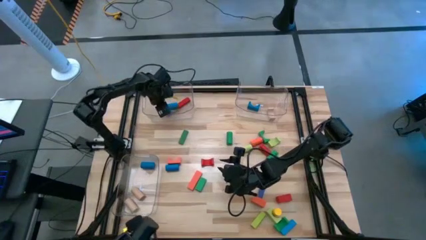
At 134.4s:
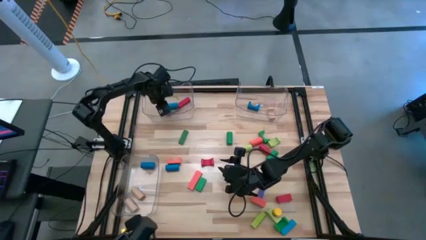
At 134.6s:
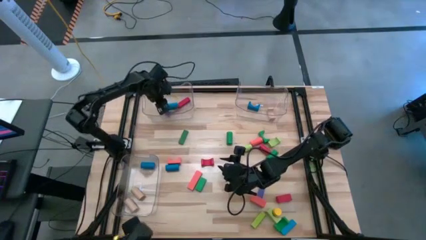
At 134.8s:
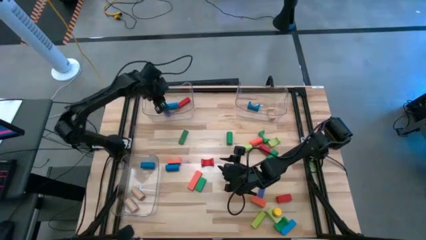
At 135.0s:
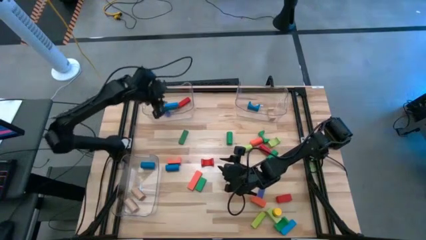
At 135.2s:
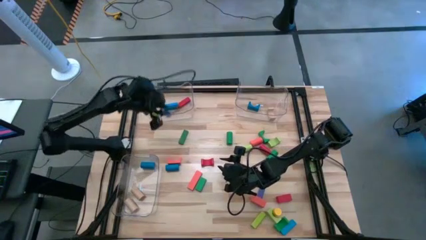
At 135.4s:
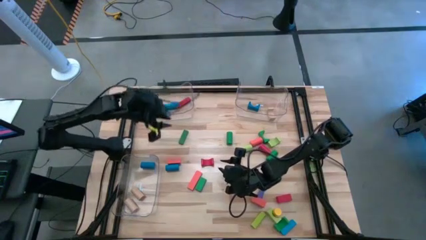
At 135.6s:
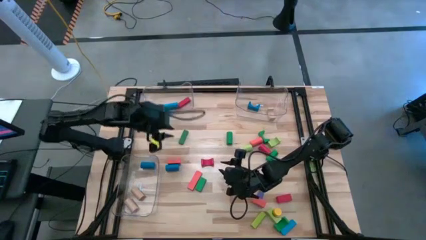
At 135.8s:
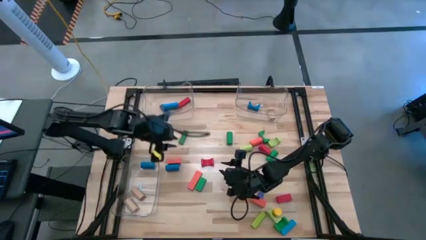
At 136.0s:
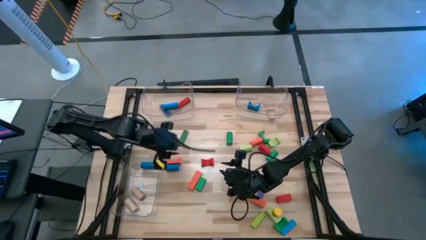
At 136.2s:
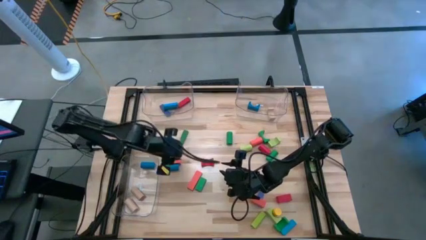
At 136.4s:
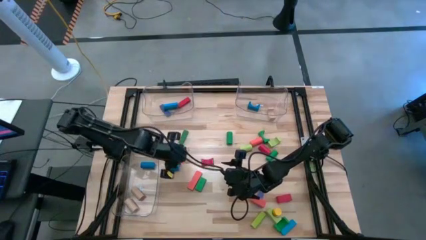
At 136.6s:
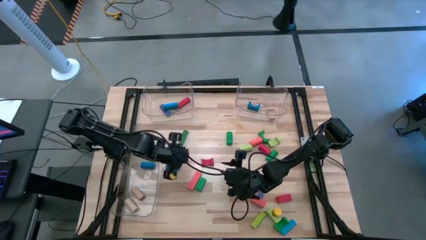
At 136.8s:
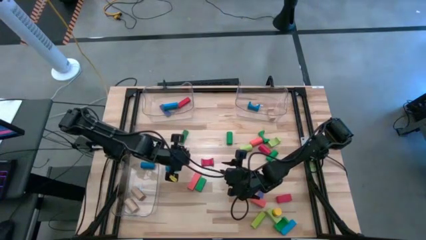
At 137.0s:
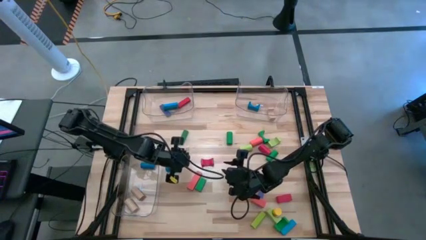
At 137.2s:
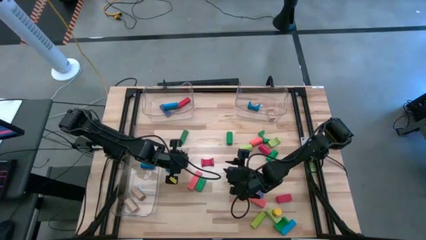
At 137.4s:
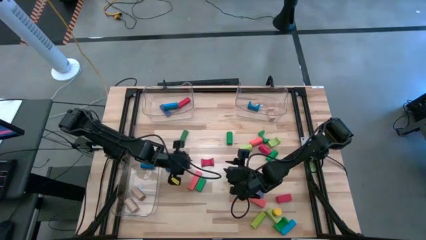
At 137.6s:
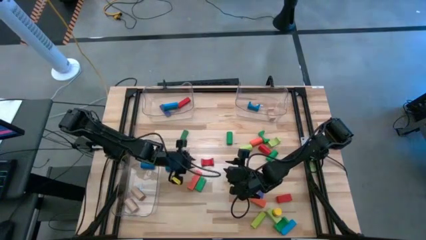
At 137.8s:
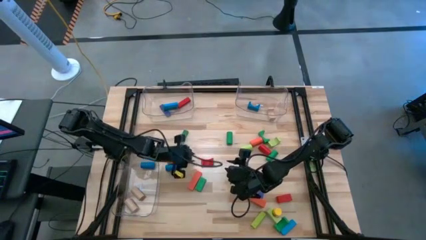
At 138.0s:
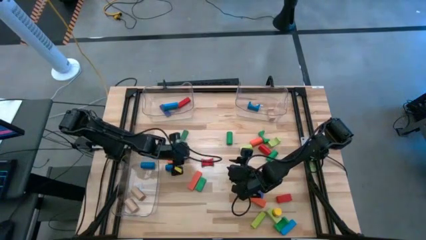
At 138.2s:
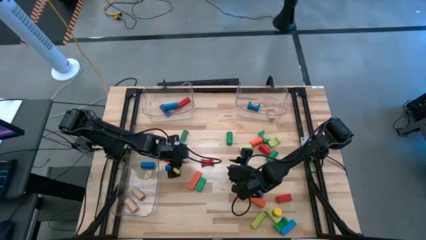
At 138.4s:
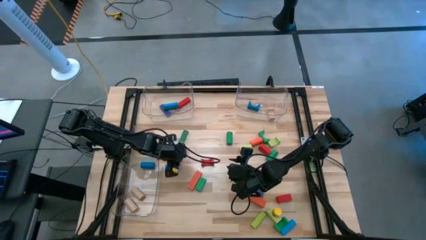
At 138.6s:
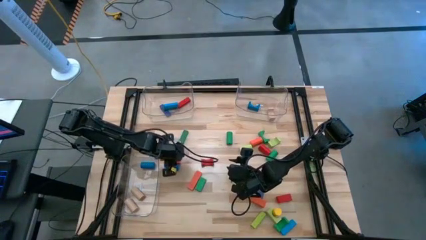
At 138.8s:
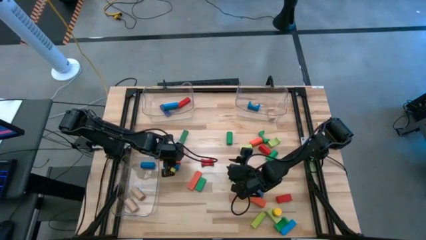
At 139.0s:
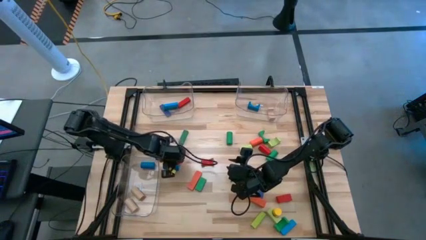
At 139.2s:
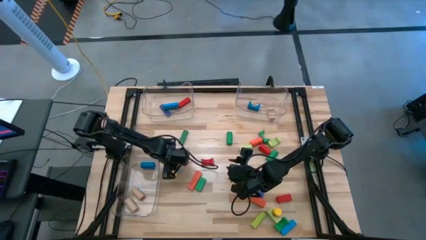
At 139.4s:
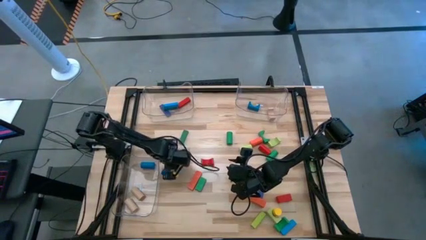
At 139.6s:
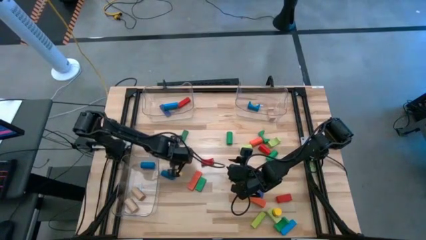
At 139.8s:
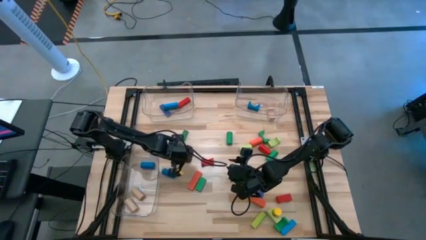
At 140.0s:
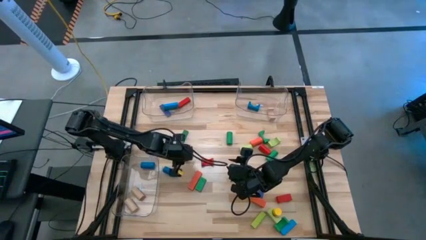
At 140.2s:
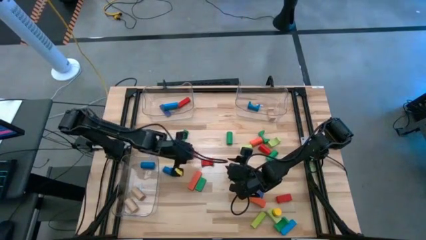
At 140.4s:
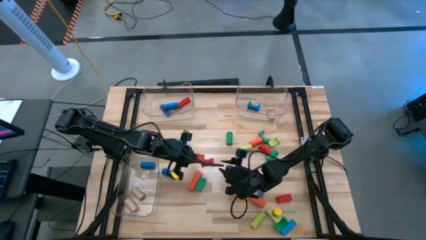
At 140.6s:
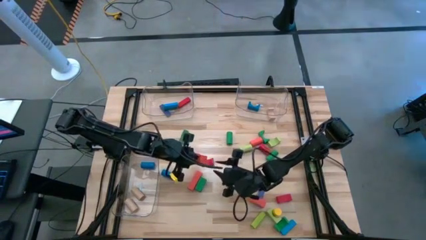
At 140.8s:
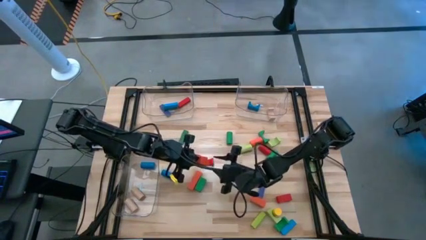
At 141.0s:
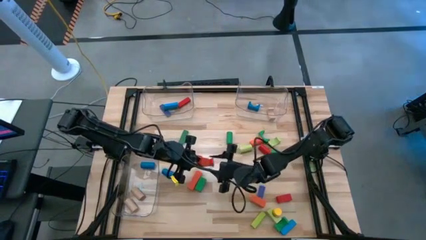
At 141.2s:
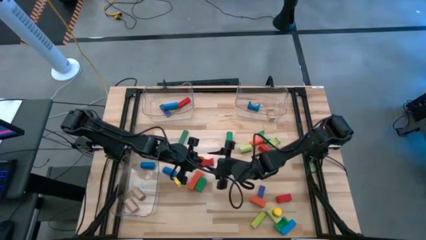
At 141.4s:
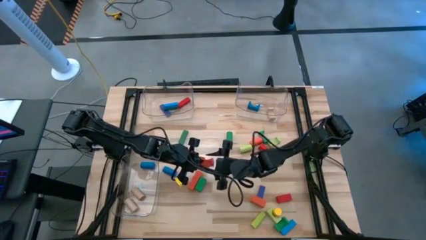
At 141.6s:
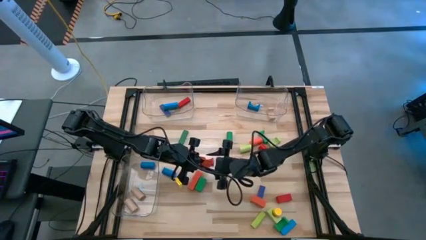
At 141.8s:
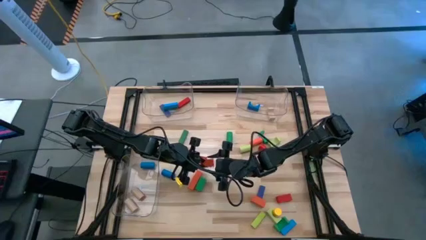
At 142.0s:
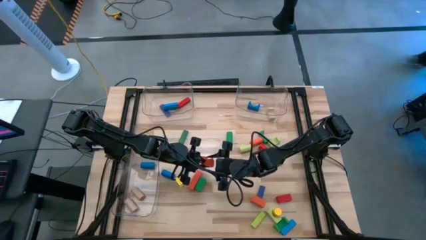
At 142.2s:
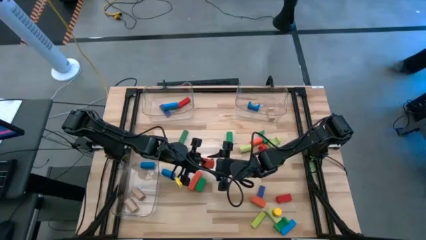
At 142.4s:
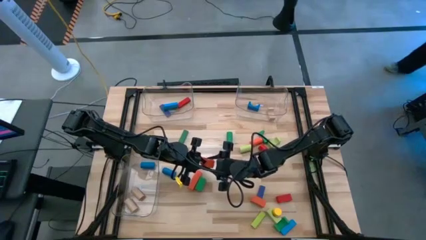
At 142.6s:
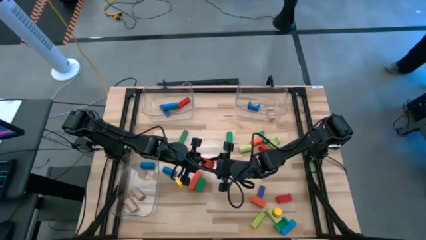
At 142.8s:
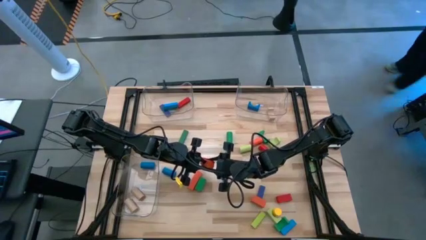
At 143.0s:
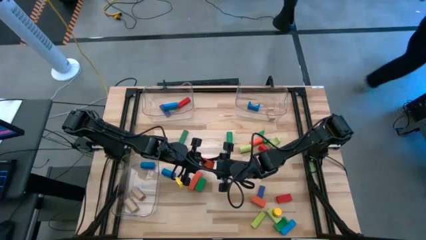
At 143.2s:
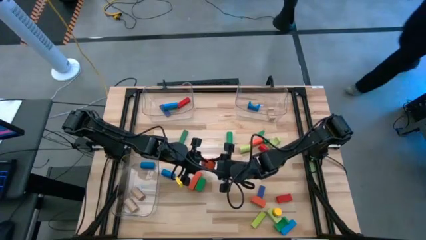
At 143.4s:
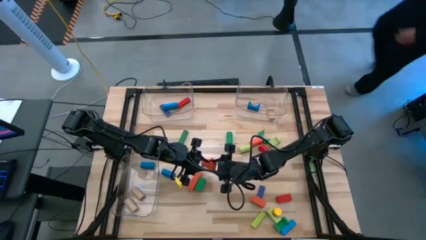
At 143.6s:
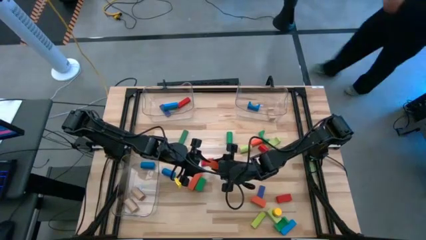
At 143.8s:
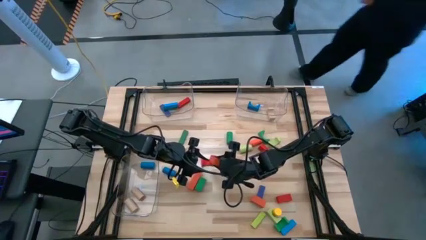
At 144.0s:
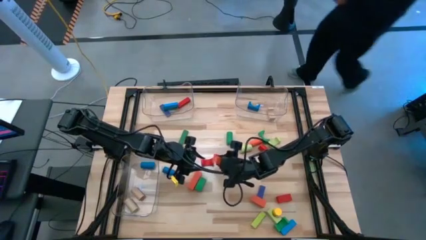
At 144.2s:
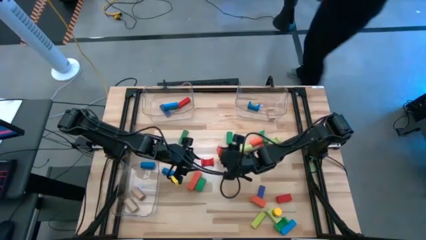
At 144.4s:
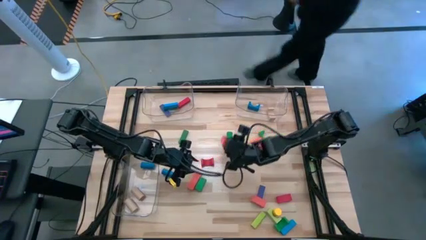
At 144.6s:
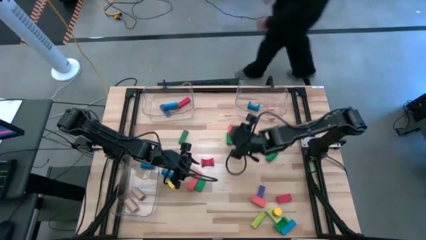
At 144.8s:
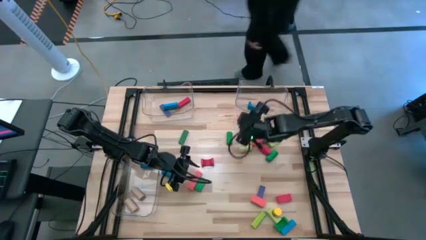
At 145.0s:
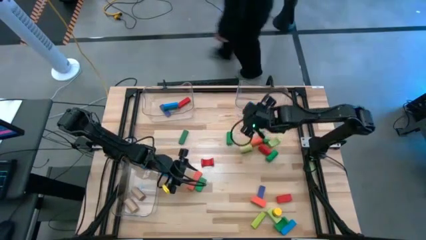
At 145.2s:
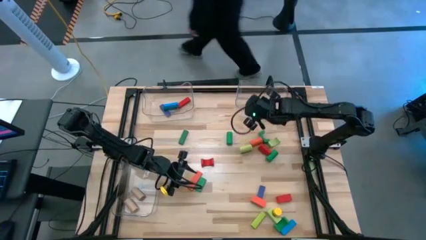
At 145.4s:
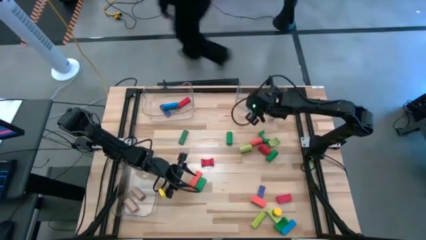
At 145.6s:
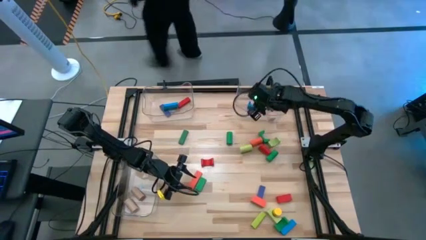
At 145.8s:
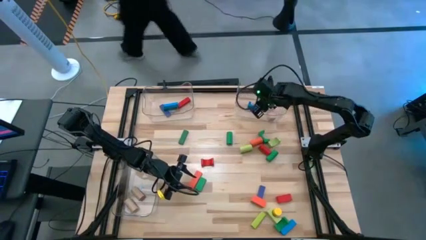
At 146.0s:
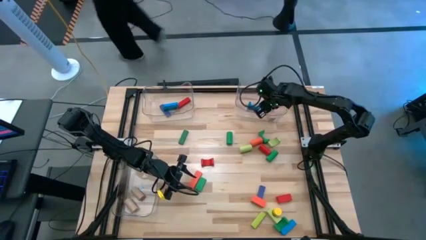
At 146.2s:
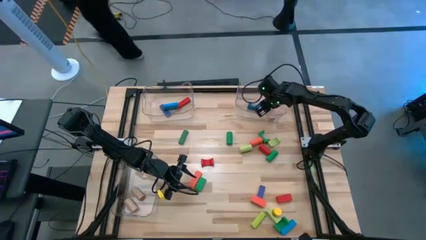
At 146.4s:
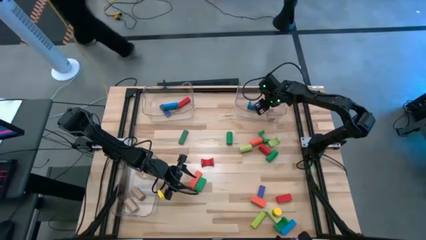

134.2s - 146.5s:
Task: Sort blocks by size
Put the orange arch block into the top right transparent bin

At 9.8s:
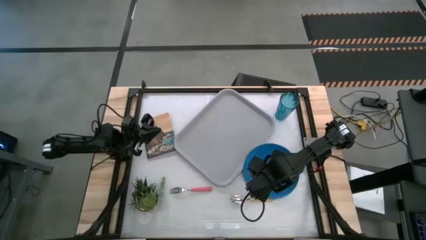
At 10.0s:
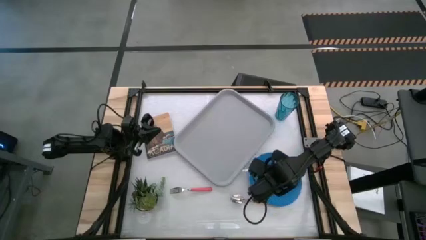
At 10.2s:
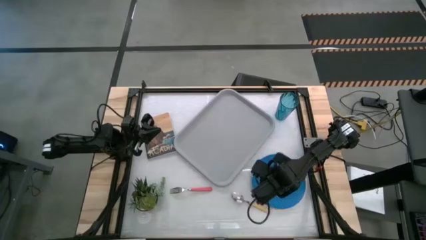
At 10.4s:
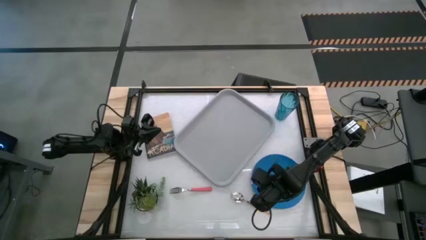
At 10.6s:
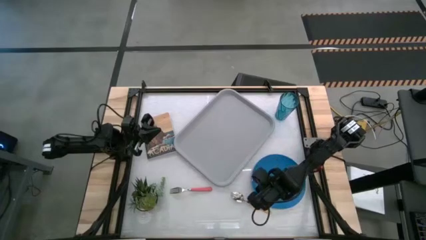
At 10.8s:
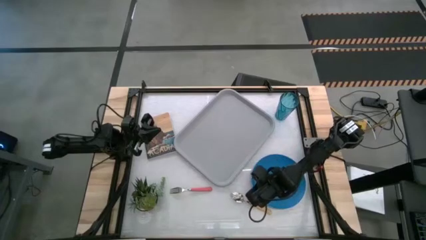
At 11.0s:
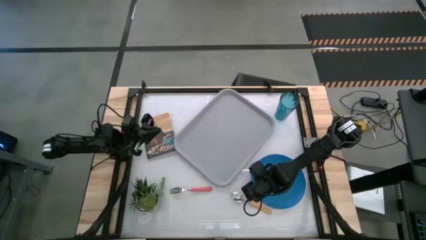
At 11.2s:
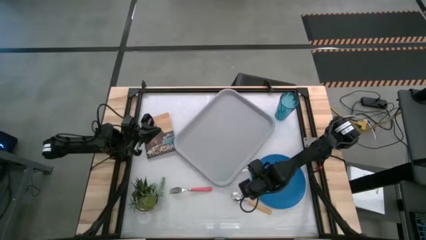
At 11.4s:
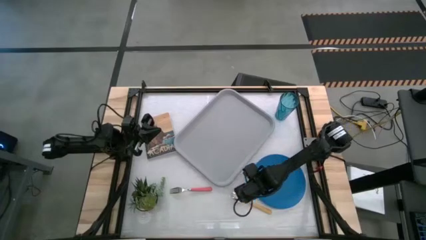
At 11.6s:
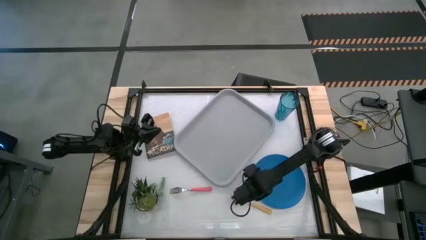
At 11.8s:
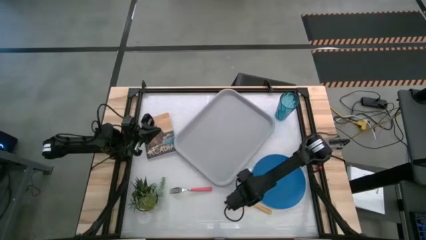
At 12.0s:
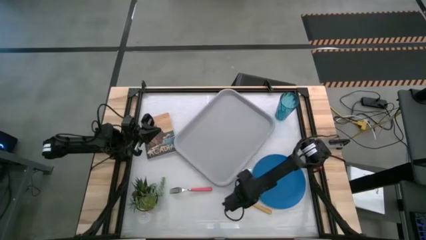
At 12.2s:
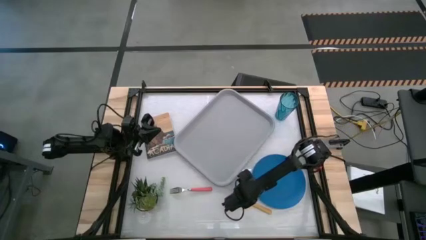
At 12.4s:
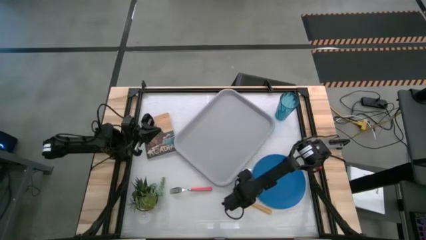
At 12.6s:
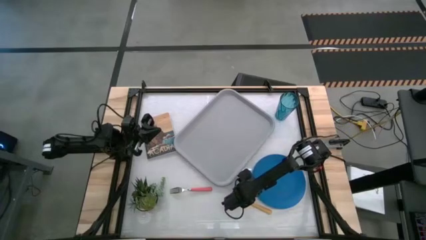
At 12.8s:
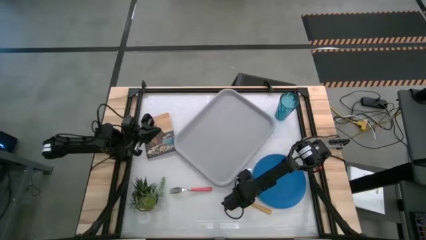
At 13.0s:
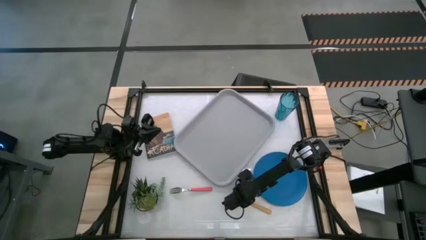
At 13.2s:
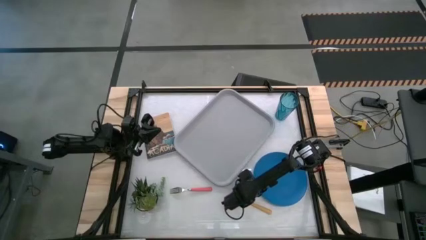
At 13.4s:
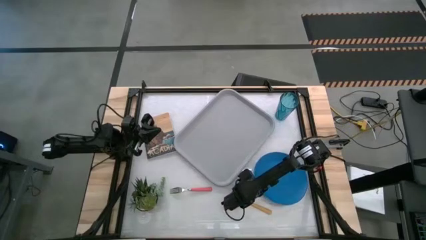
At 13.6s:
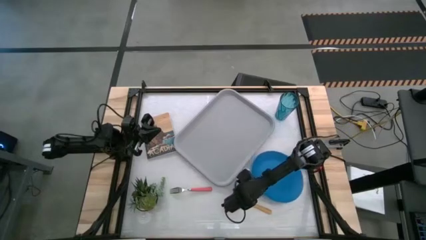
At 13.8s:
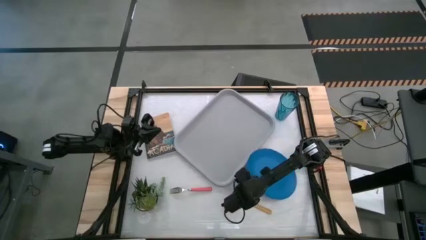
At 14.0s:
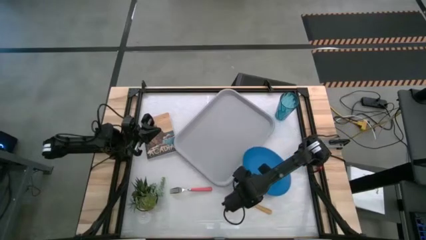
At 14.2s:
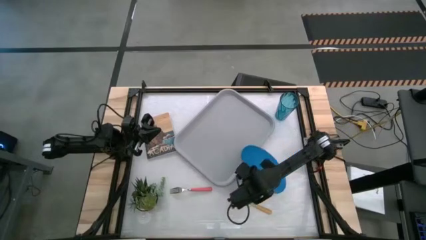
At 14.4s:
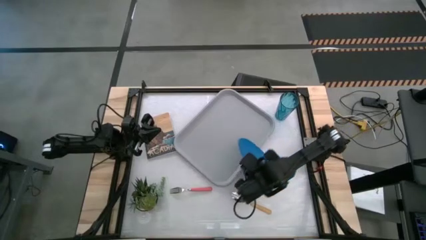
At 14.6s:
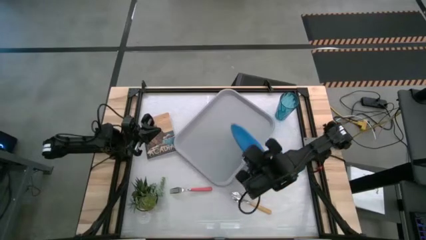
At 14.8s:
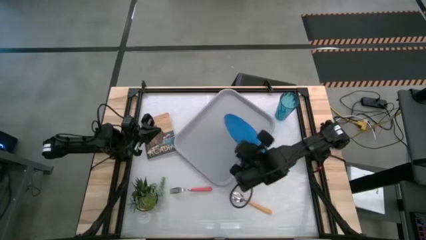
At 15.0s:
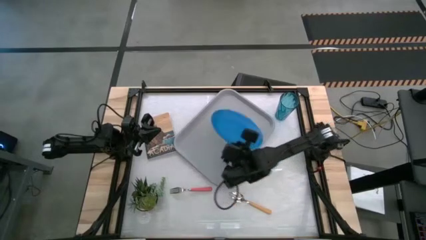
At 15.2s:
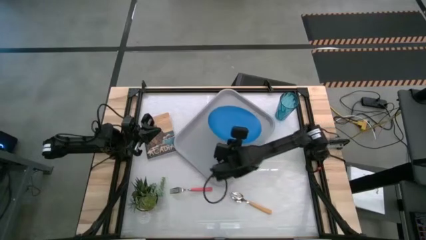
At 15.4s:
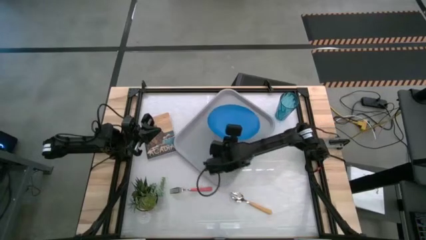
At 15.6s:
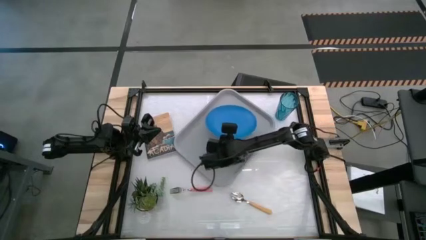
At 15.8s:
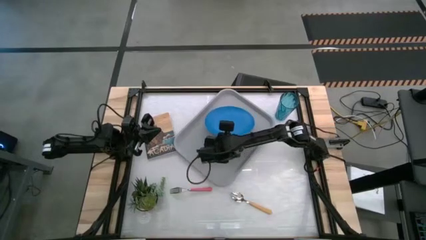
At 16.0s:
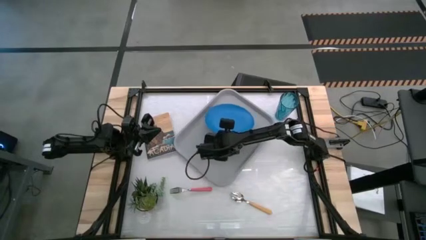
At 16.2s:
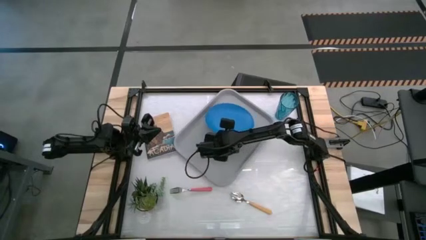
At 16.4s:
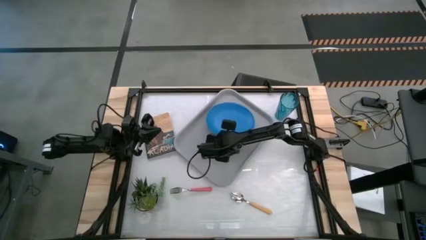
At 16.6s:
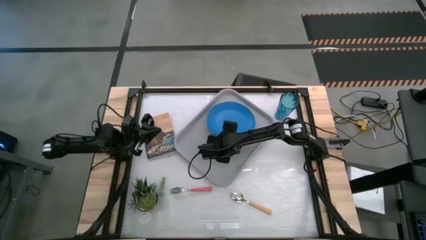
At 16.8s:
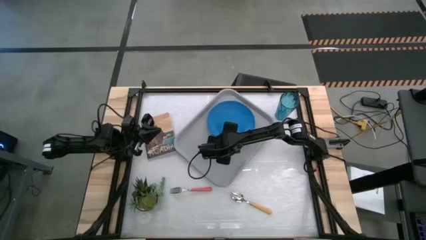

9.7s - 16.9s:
Task: Pick and place plate/cup/fork/spoon on tray
Put the blue plate on the gray serving tray
